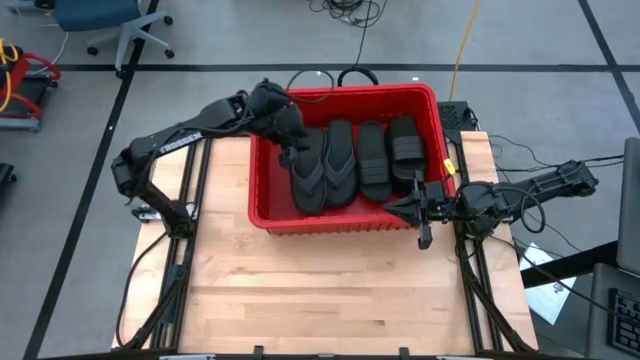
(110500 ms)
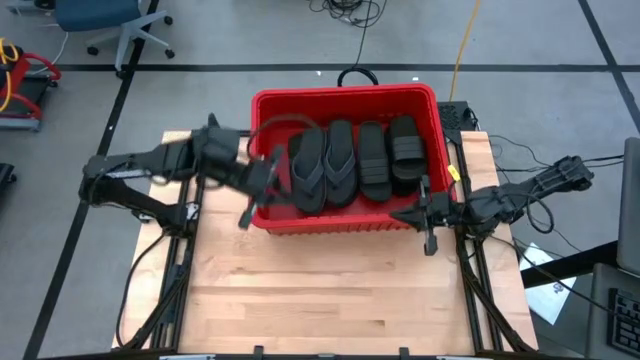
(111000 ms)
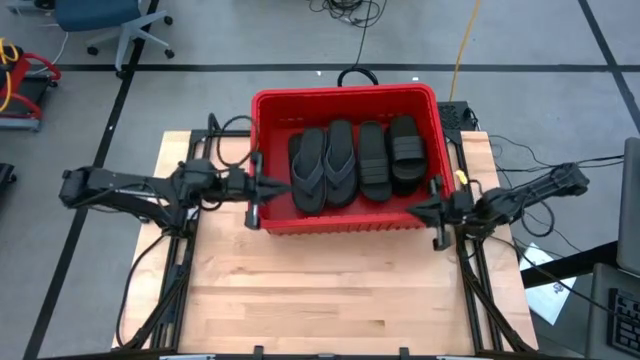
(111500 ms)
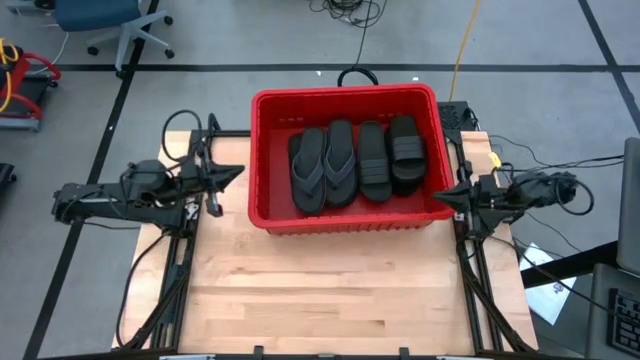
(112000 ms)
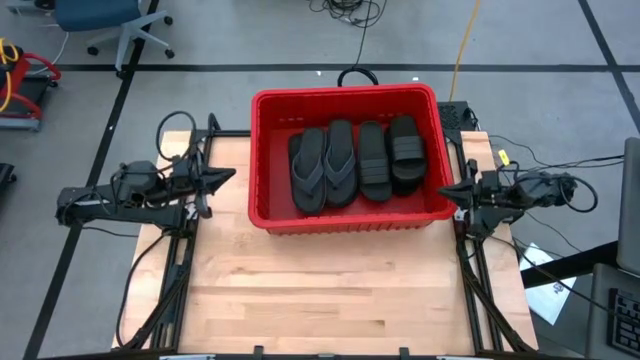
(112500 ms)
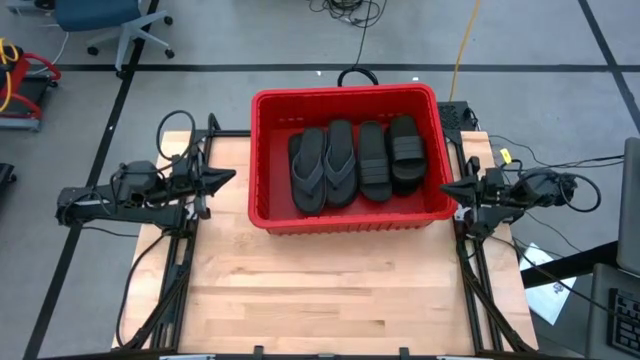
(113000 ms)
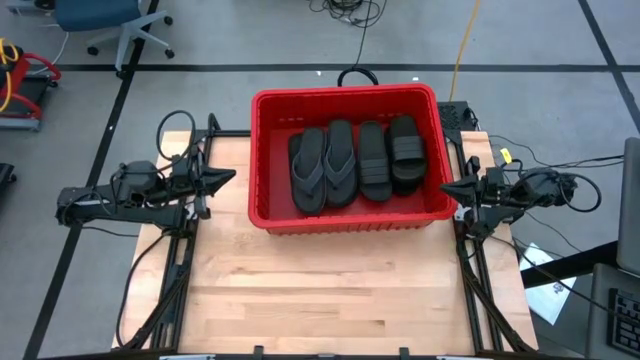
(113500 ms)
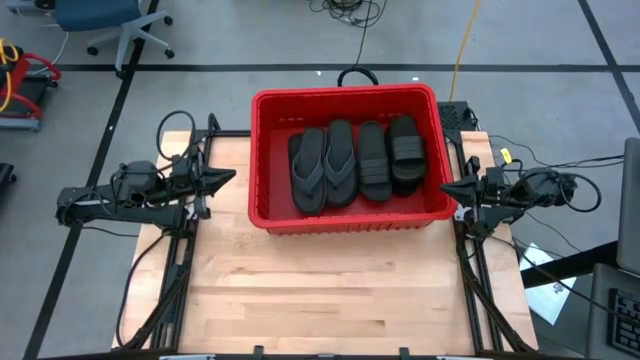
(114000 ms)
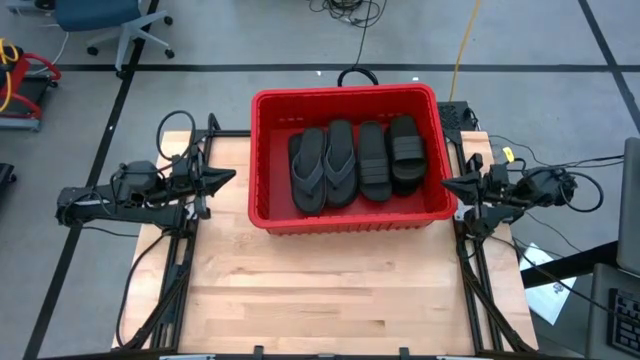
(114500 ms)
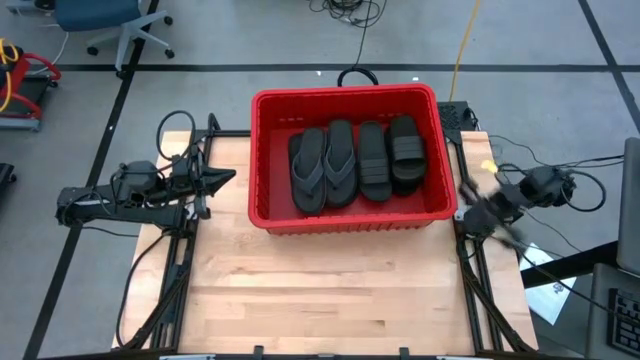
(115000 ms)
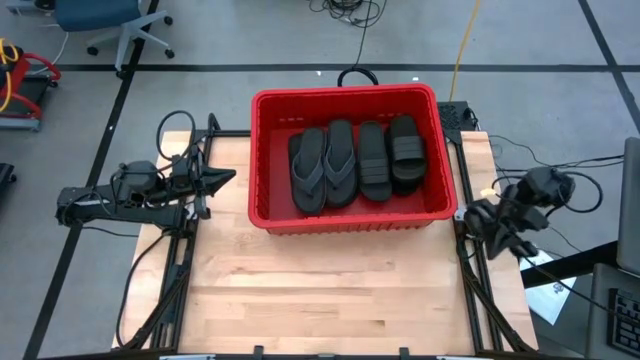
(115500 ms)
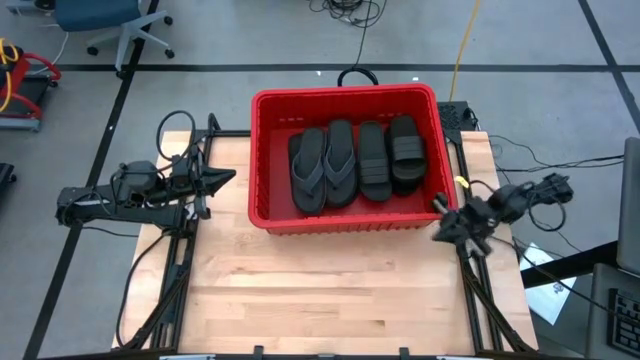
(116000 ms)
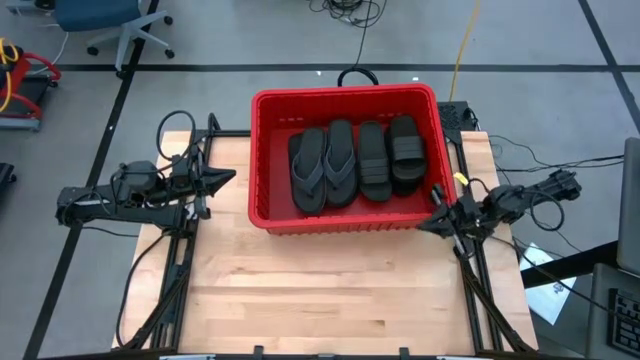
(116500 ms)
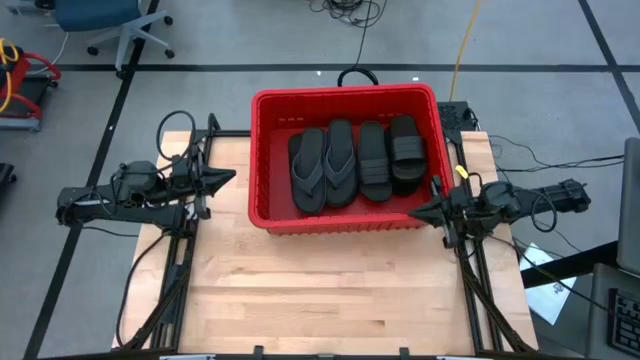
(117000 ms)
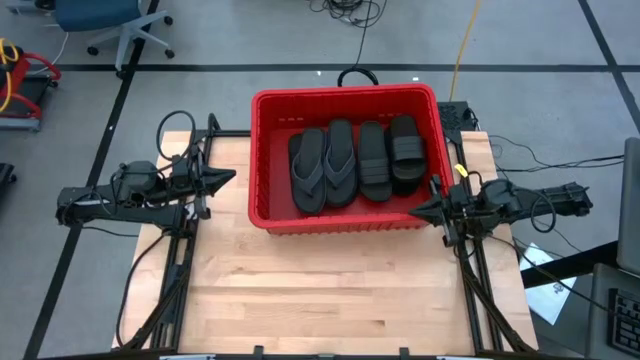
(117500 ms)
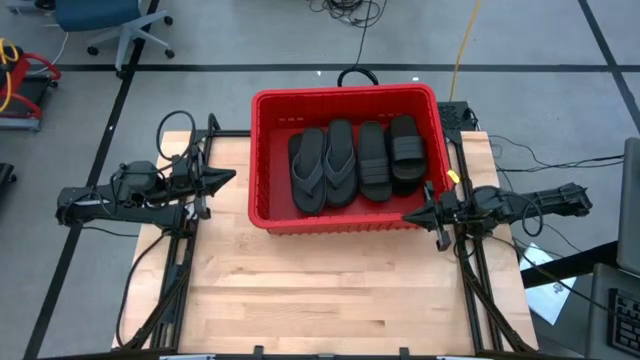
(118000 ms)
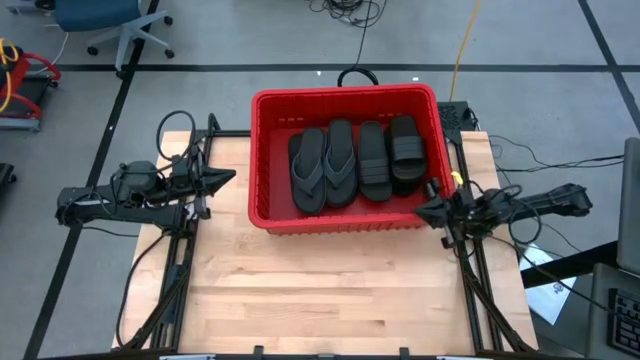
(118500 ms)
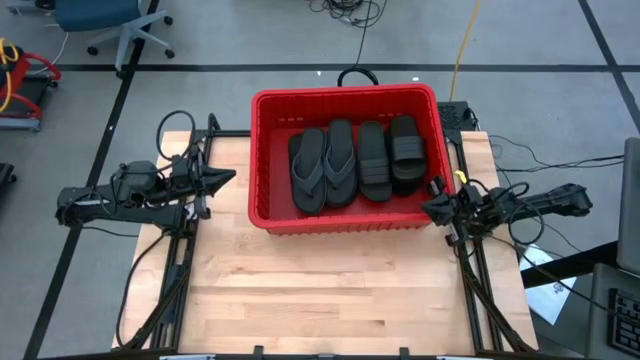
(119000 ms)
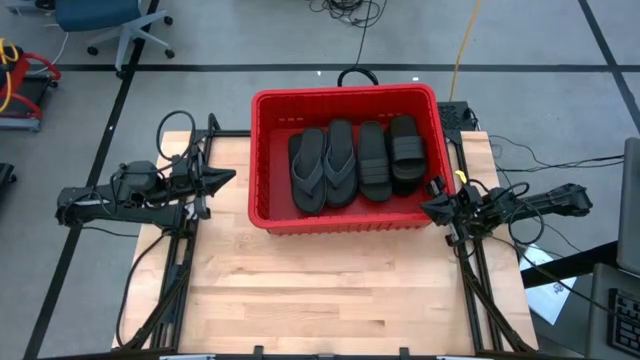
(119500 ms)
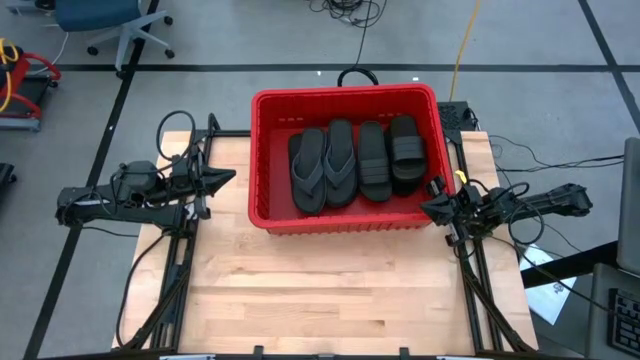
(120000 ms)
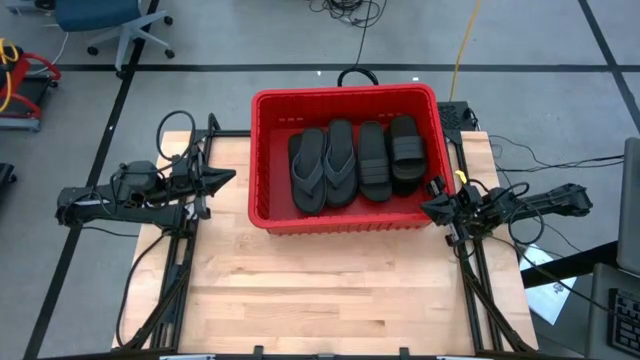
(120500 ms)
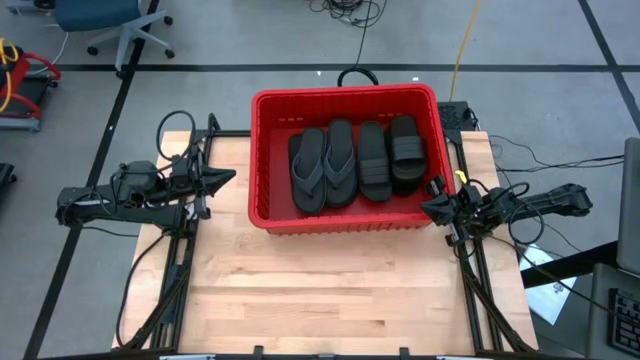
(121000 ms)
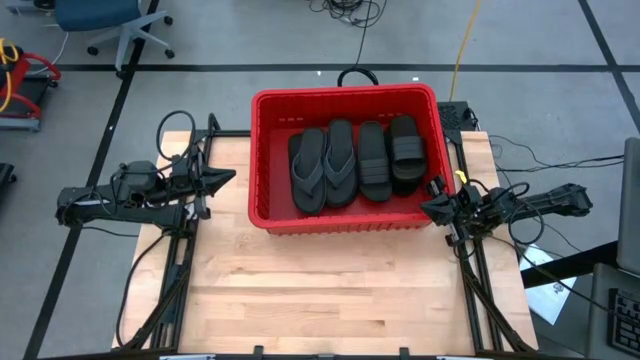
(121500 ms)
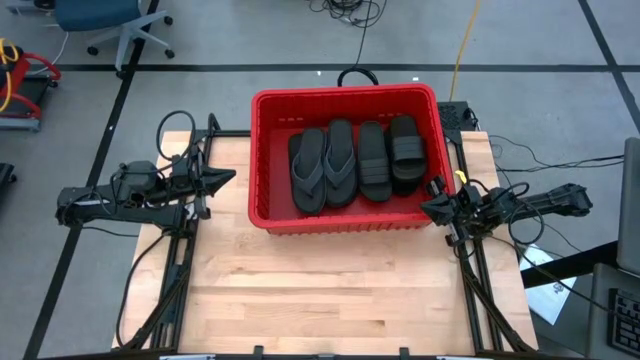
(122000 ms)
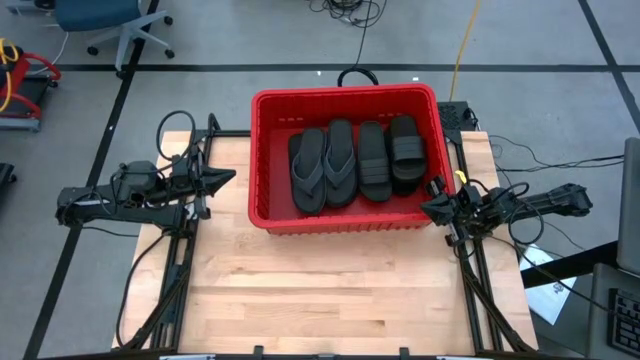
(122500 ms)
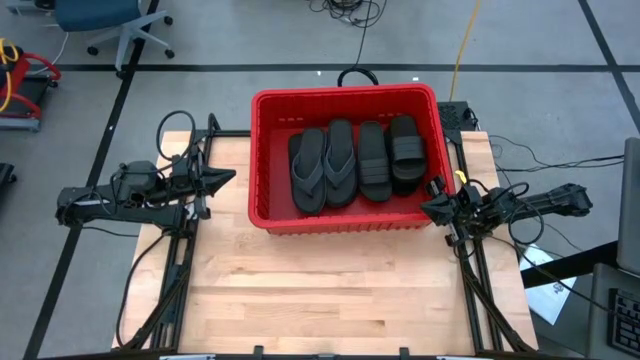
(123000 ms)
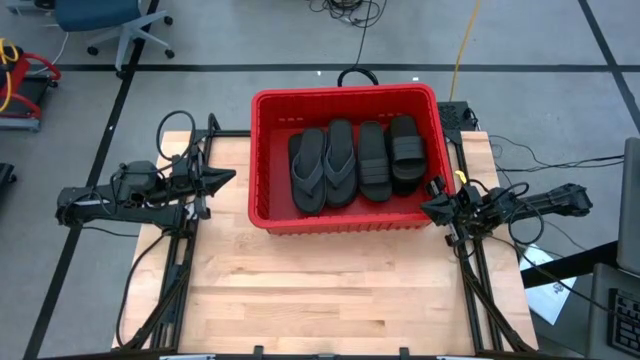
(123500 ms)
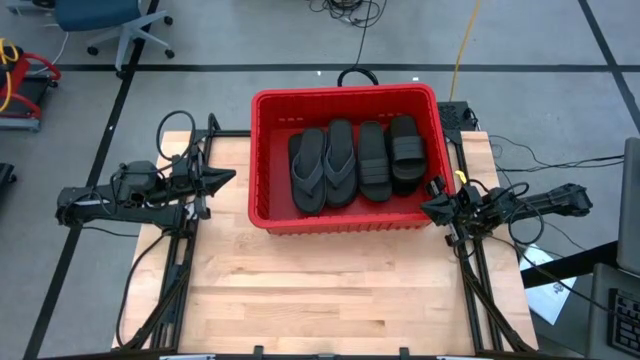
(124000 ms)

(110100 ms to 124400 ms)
Task: Pick and place slides into bin
Return to Home Position

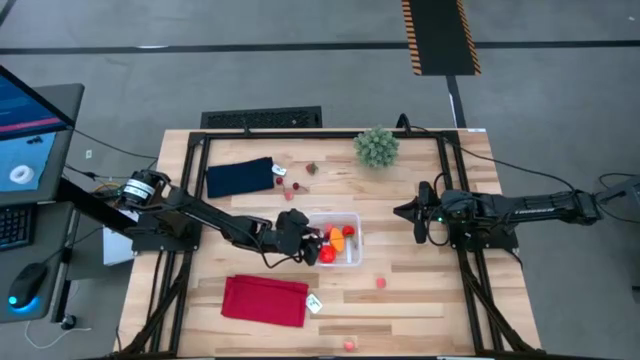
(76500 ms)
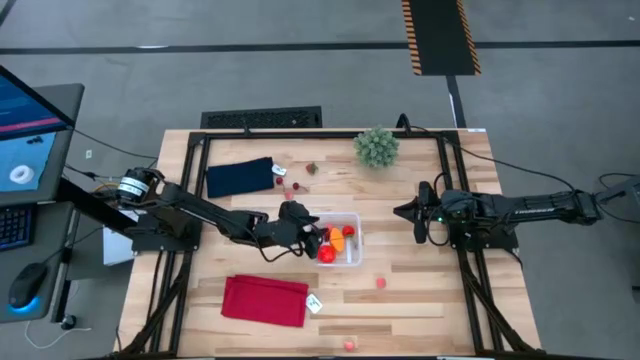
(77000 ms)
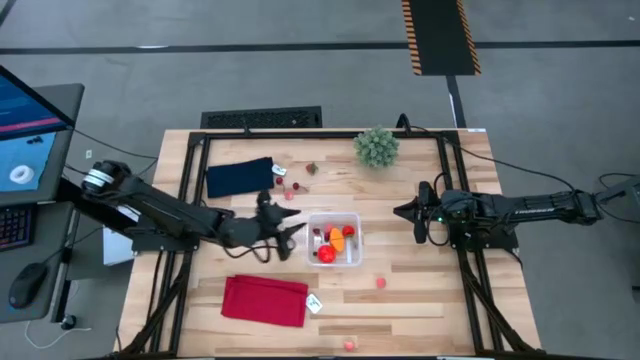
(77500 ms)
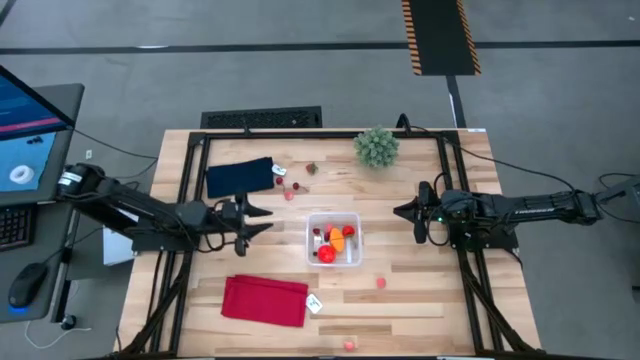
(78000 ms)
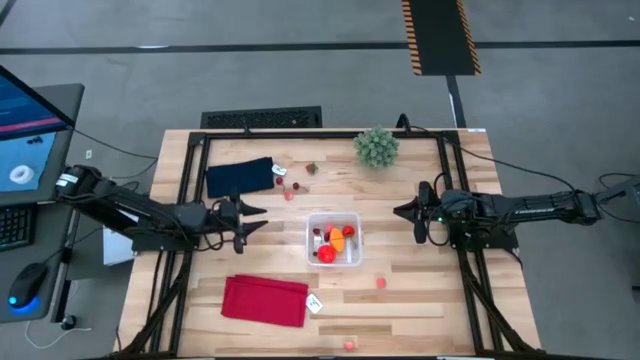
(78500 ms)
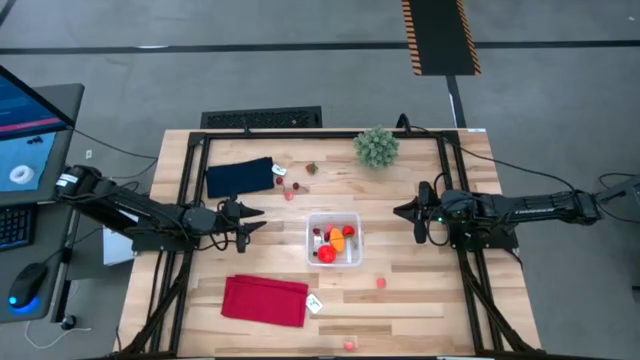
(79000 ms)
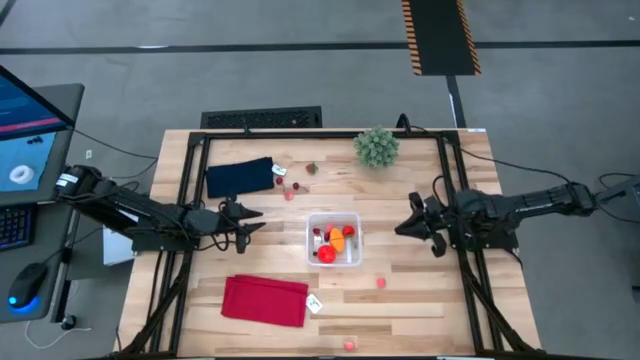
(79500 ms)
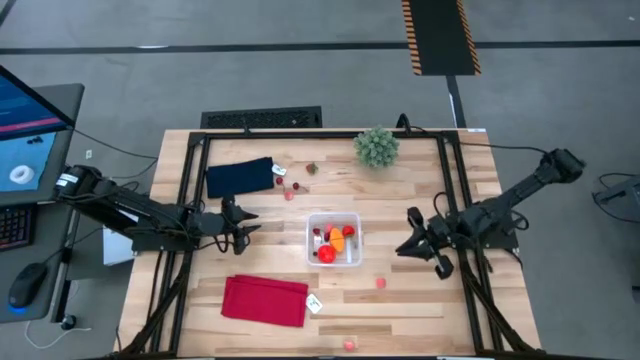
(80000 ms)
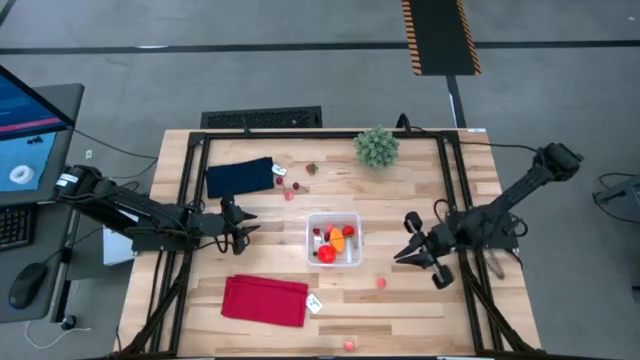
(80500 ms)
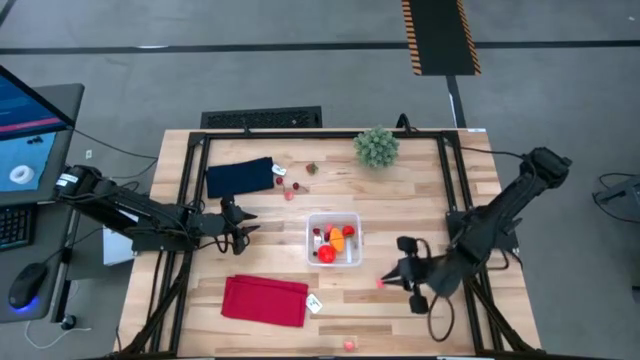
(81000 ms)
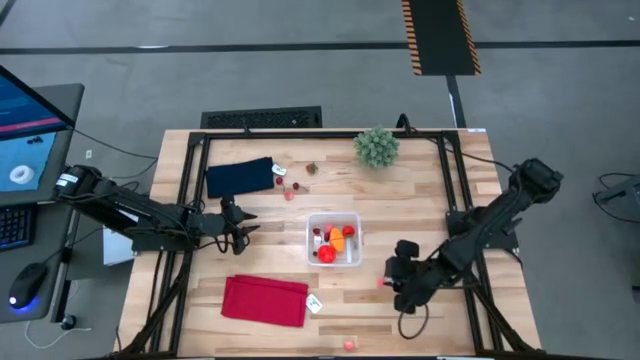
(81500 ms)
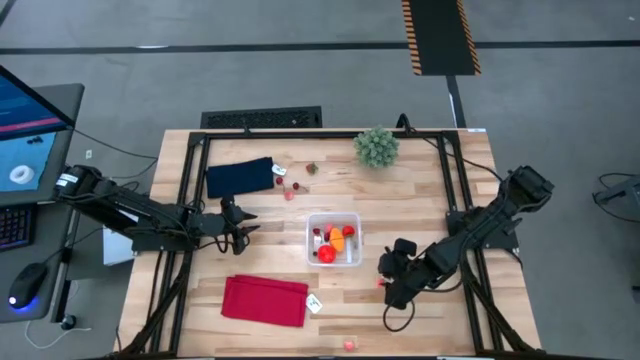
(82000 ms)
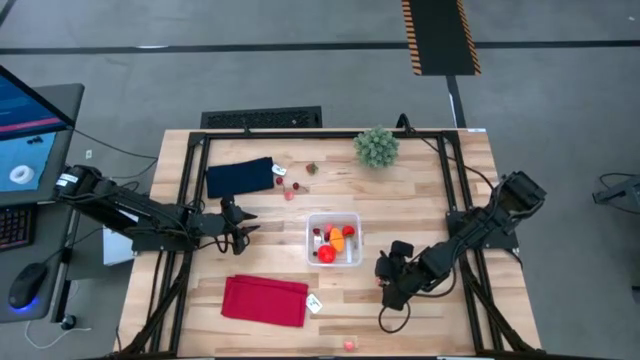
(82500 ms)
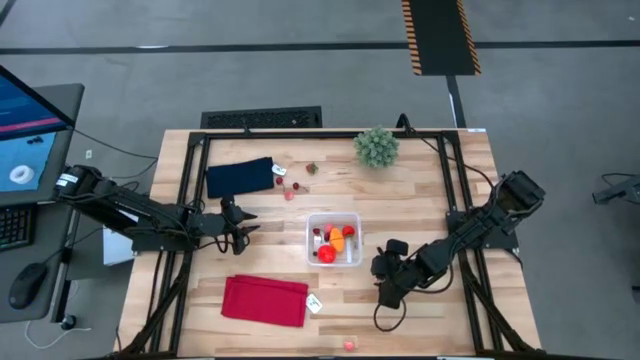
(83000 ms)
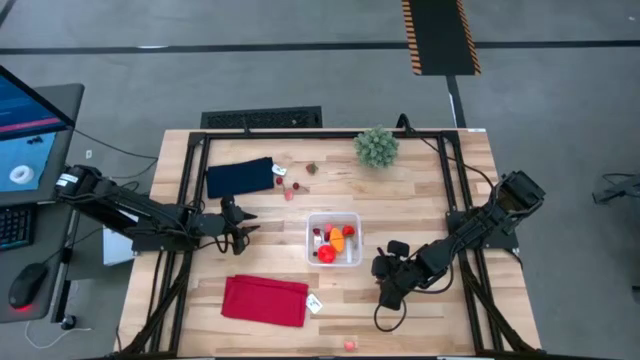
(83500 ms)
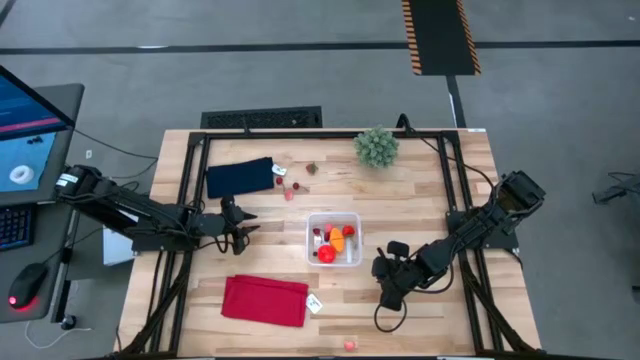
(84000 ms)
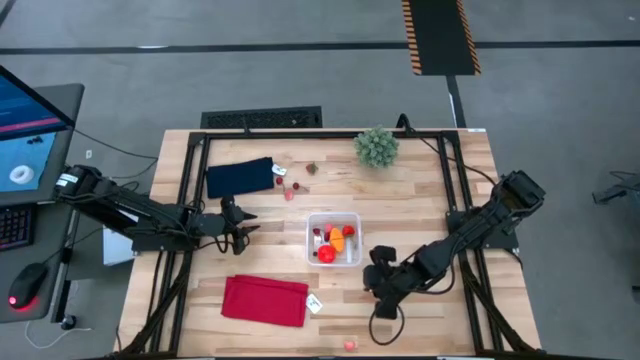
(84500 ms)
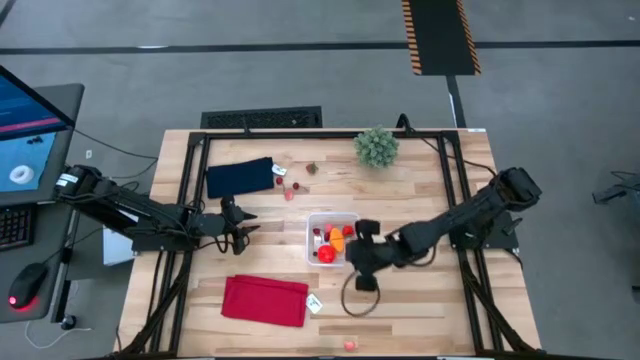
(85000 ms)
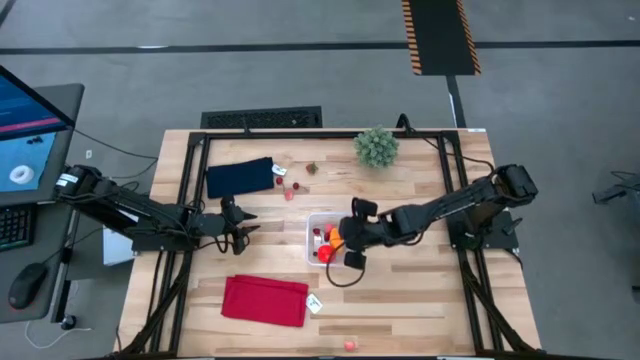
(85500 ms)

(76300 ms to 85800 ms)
Task: Pick and placing Produce into tupperware
Put the pink peach into the transparent bin
